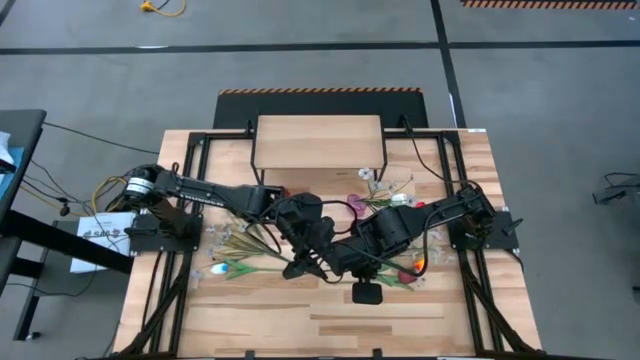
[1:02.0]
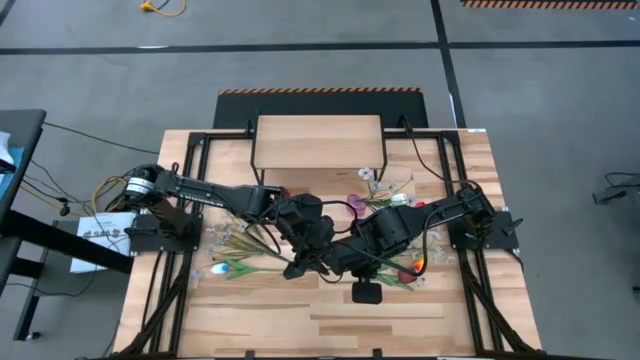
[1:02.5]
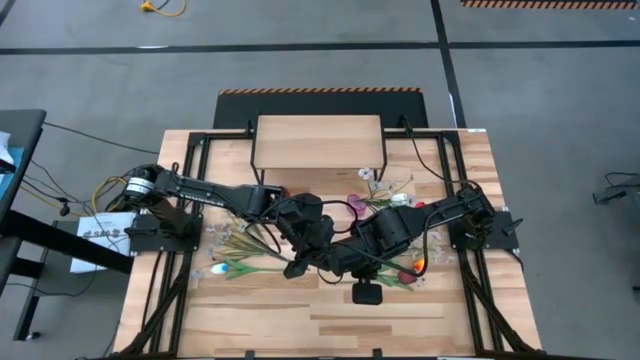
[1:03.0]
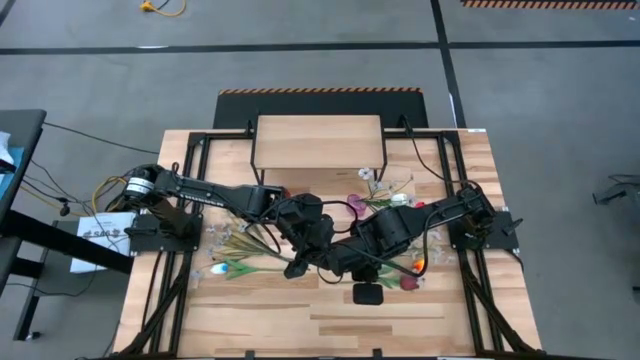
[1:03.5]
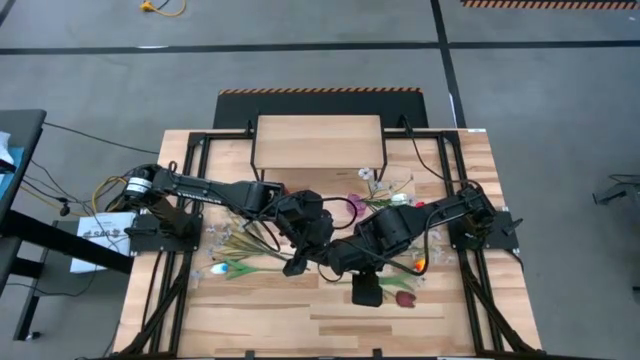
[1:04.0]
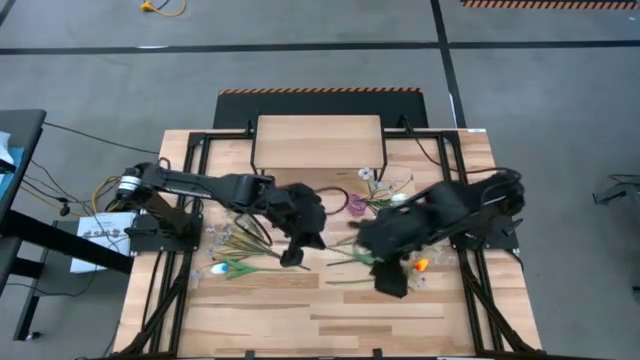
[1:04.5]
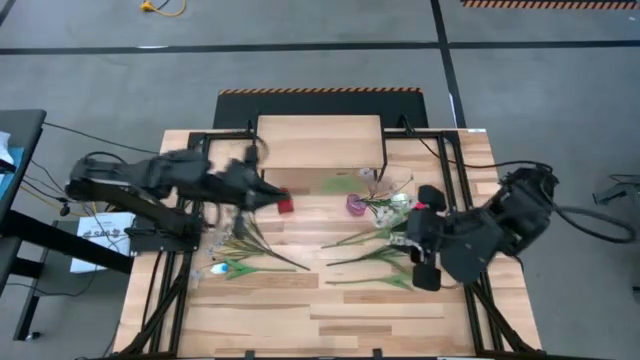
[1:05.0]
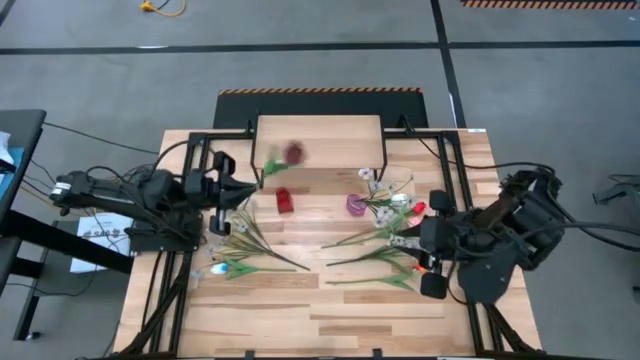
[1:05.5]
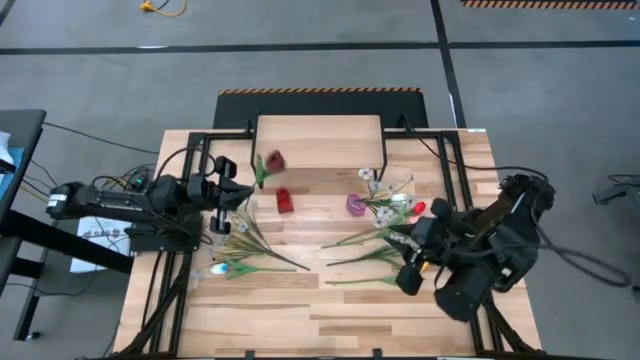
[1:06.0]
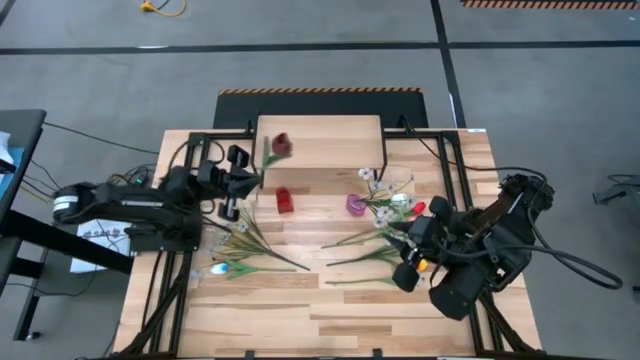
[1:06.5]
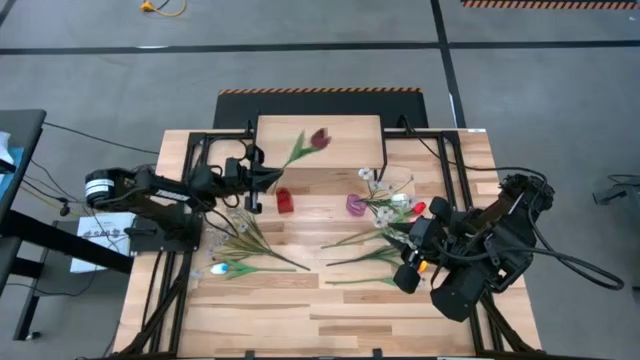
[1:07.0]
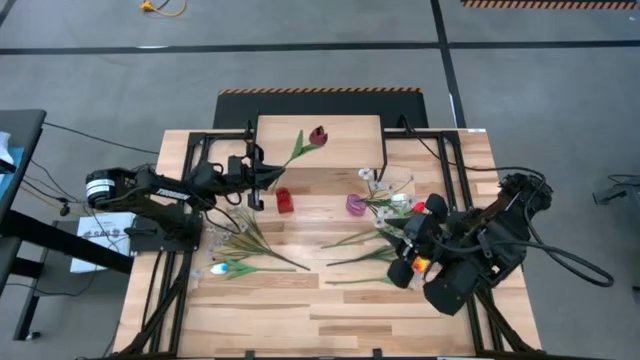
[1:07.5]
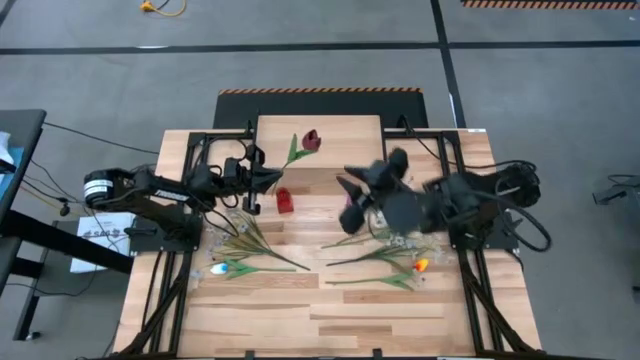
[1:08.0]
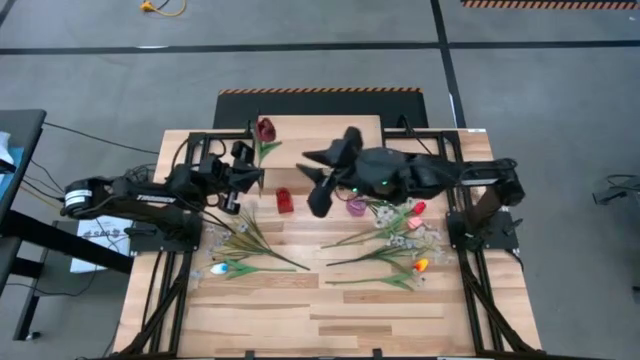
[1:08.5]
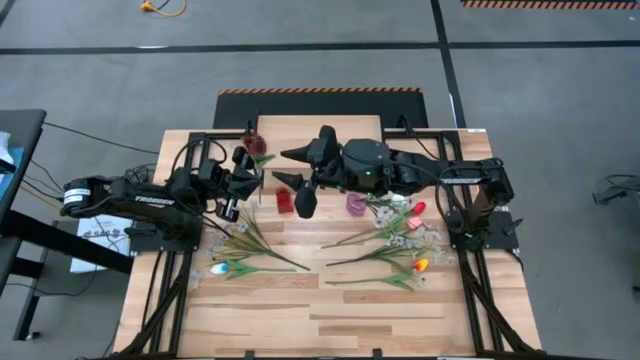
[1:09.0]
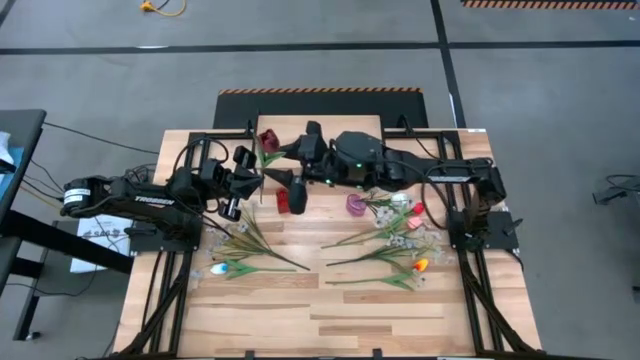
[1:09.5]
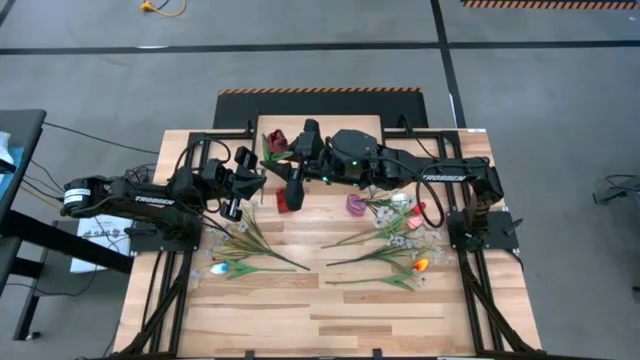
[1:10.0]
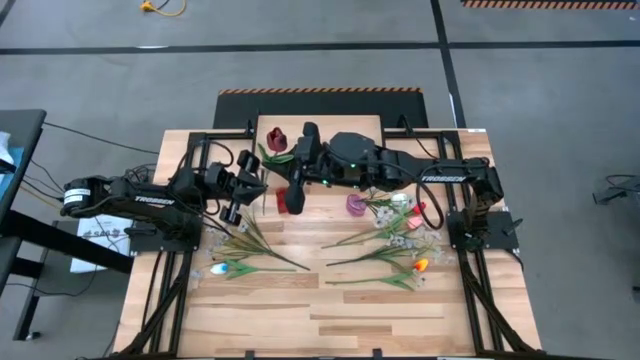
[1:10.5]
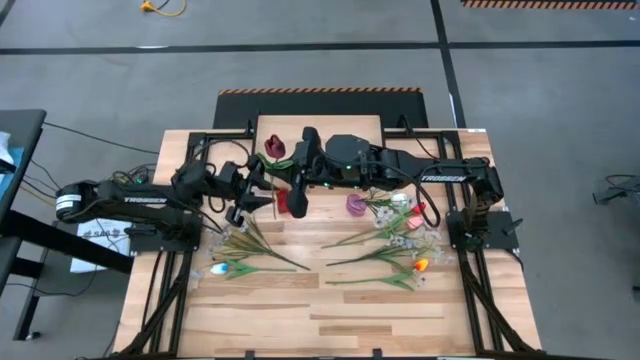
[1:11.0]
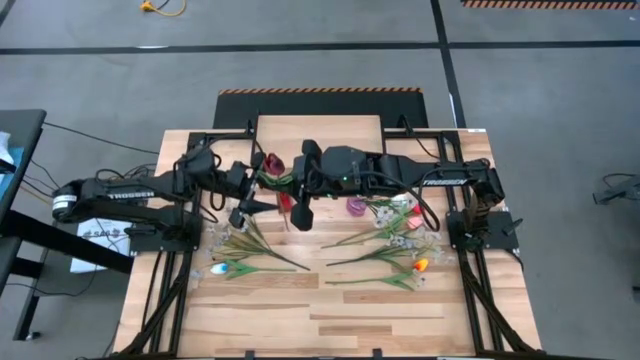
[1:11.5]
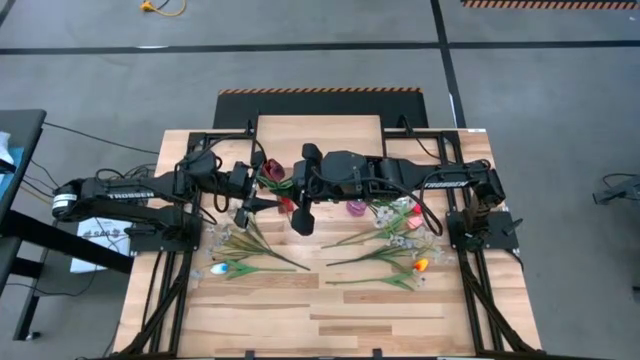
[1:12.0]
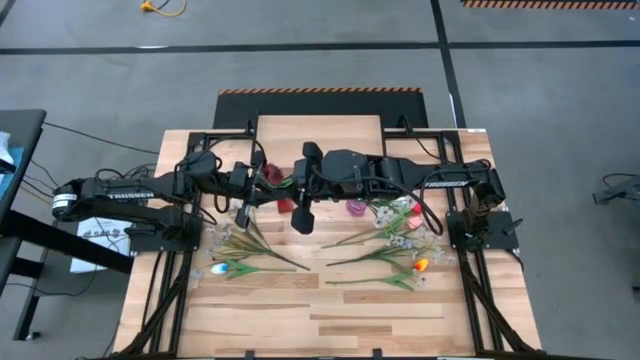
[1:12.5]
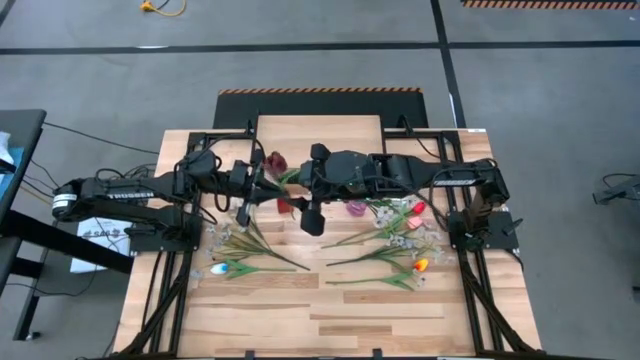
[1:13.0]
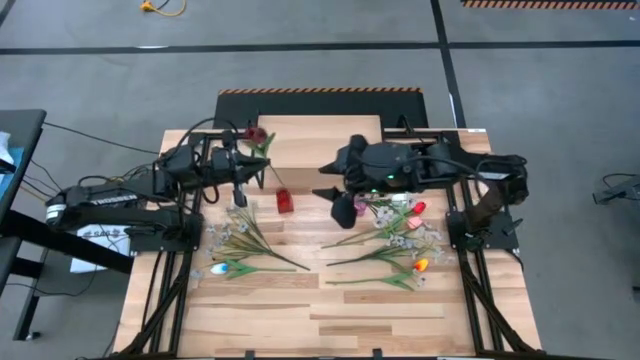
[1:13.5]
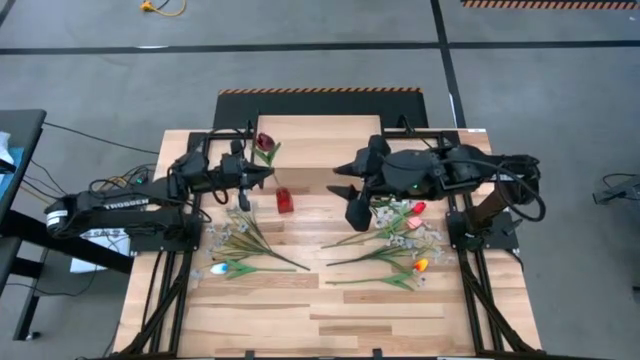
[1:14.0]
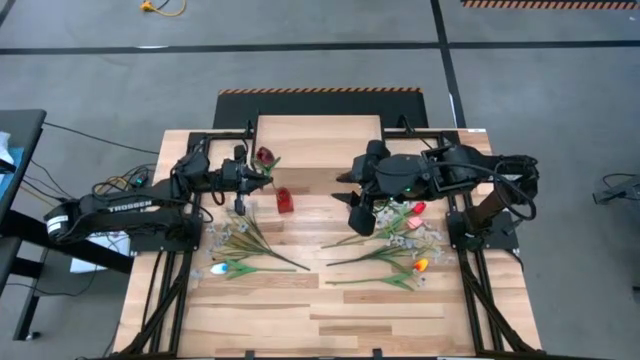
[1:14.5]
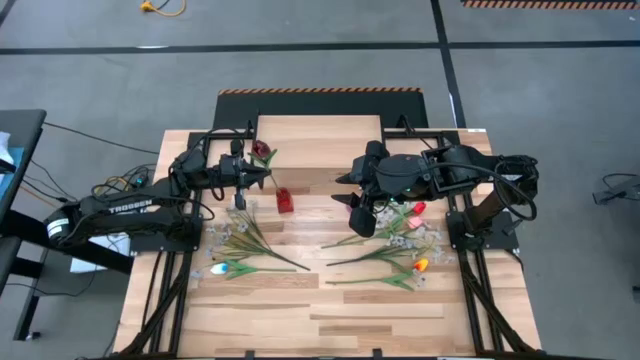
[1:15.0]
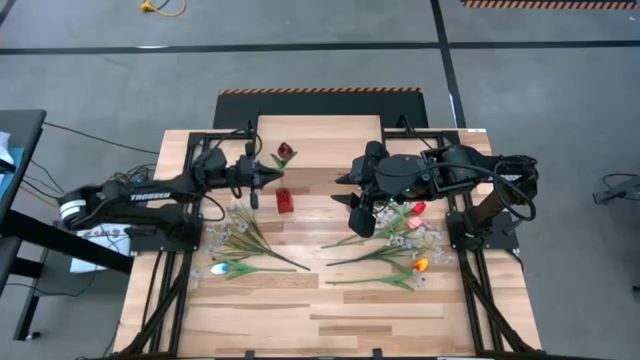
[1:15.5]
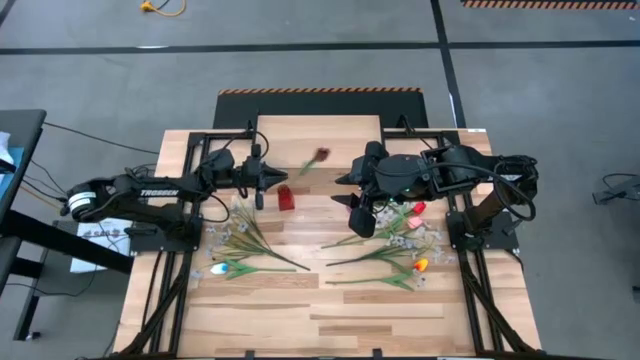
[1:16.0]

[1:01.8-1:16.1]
Task: Pick and place flowers into a vace then onto a shelf
Put the dark red tulip into the red vase

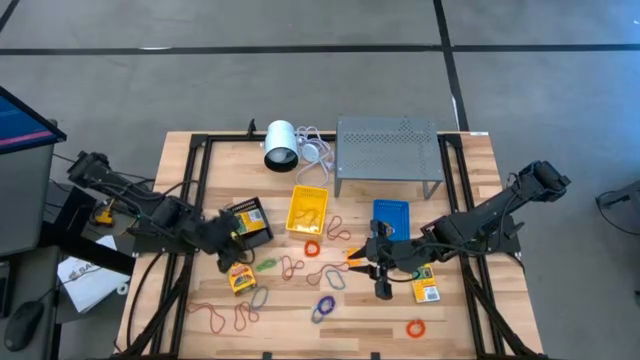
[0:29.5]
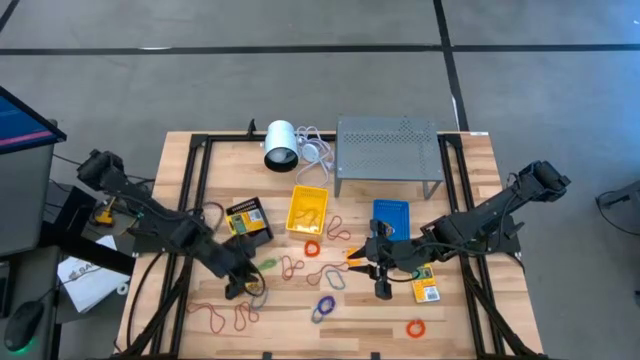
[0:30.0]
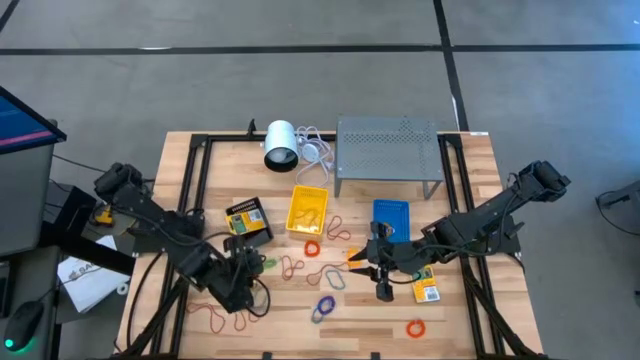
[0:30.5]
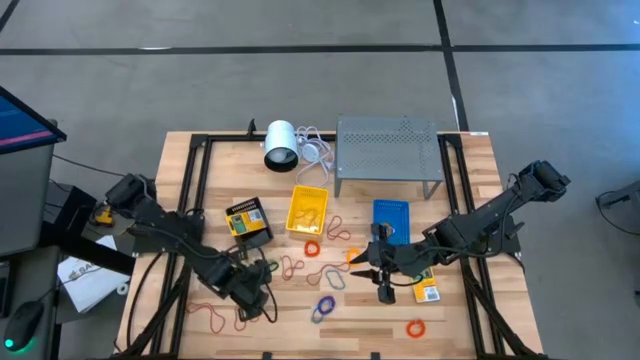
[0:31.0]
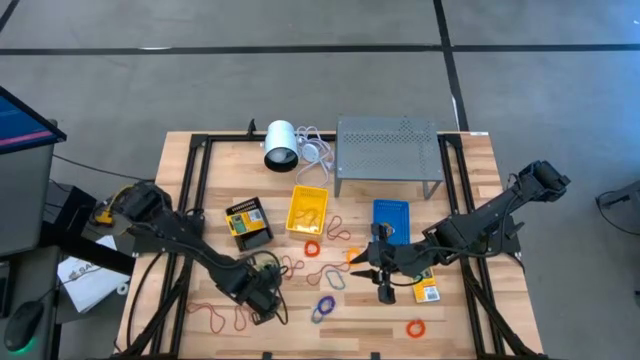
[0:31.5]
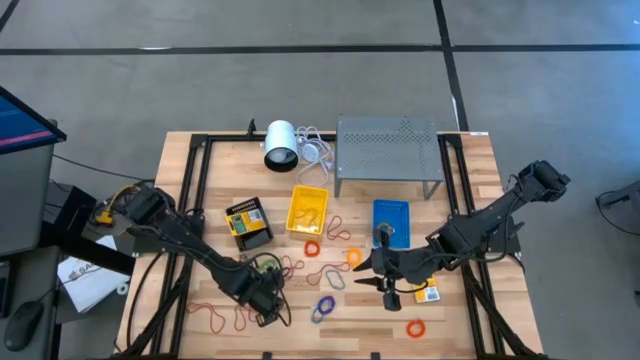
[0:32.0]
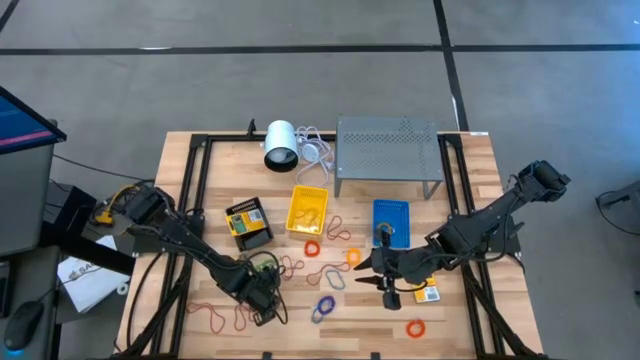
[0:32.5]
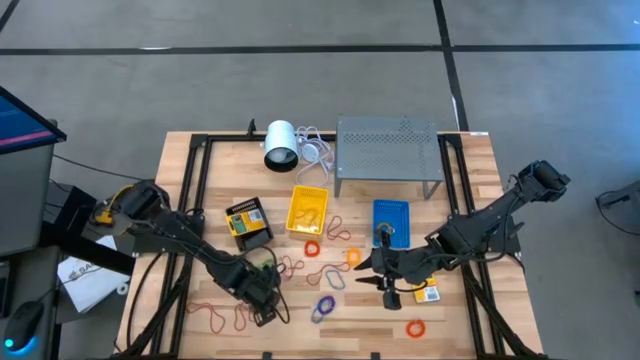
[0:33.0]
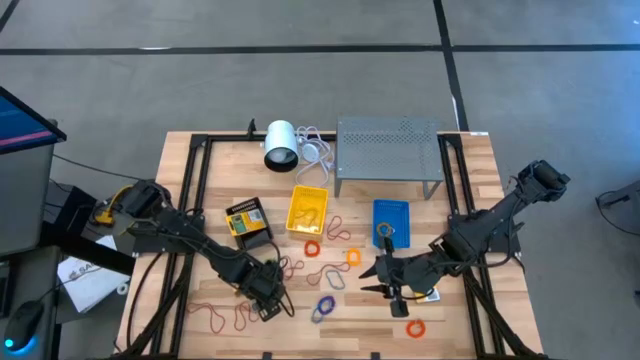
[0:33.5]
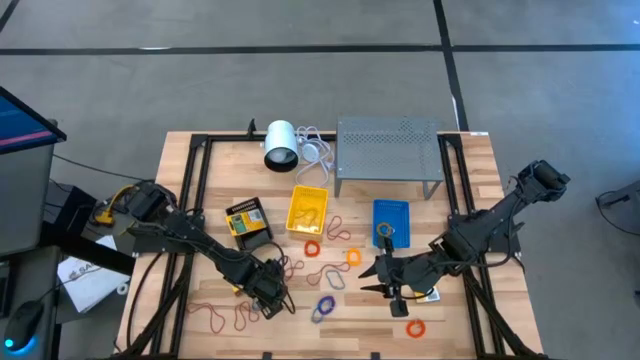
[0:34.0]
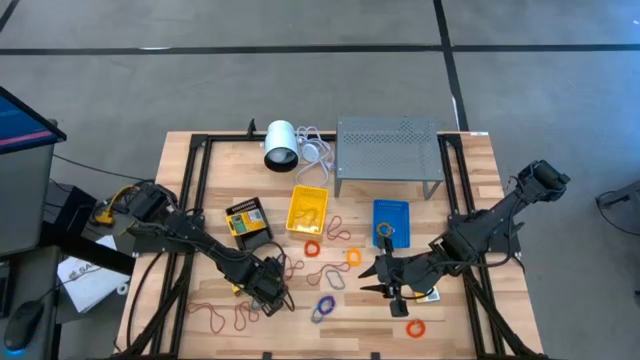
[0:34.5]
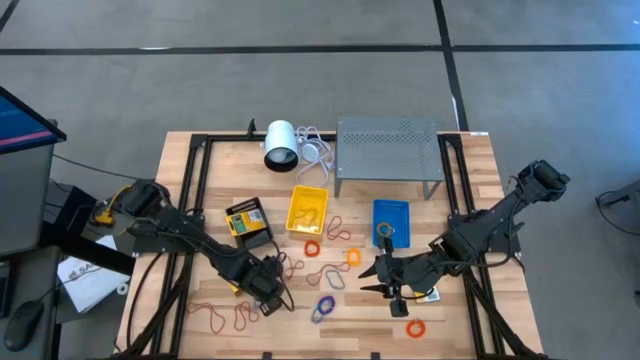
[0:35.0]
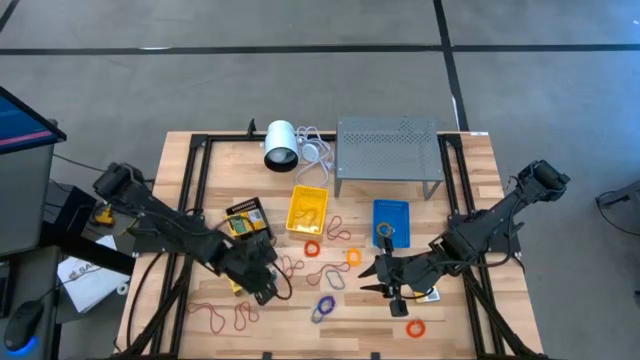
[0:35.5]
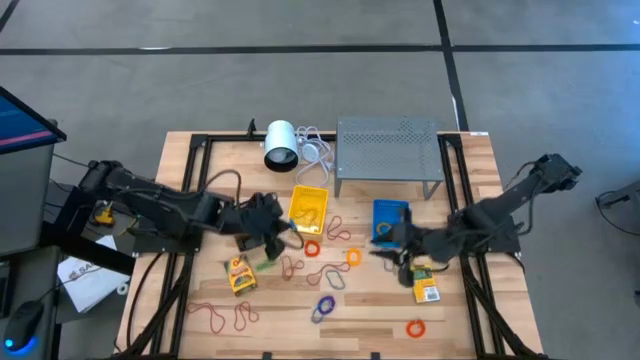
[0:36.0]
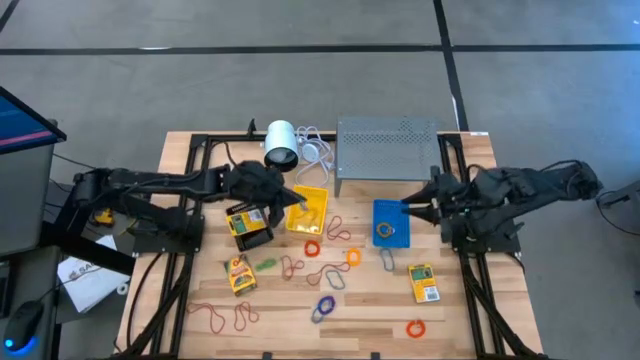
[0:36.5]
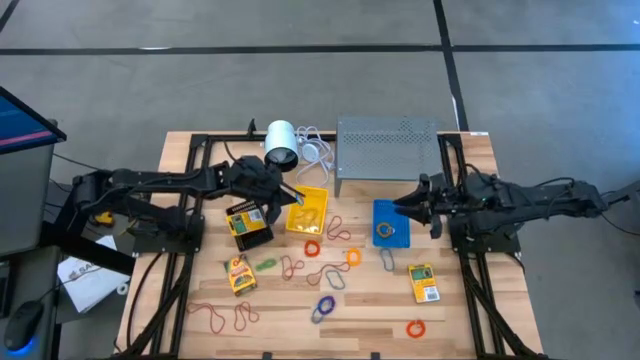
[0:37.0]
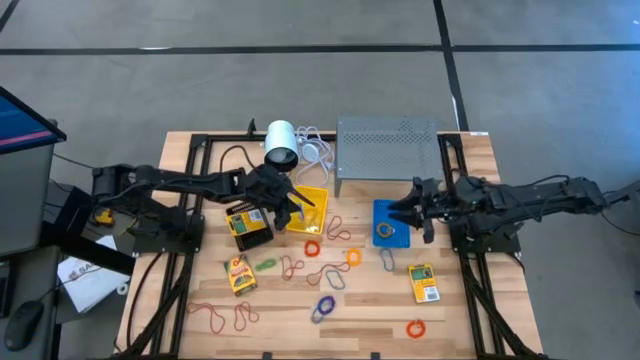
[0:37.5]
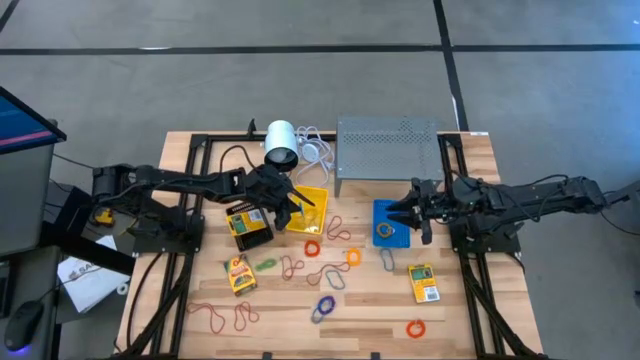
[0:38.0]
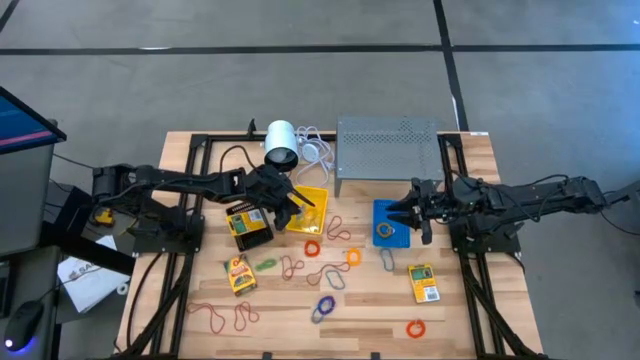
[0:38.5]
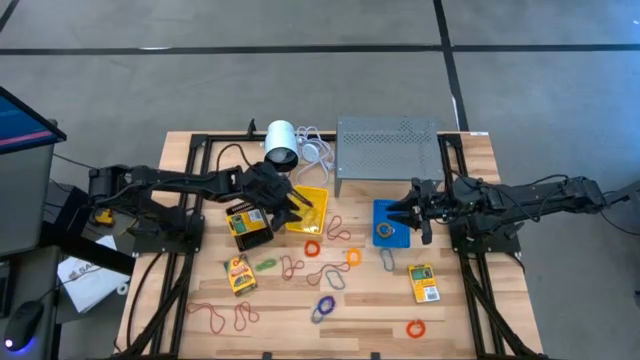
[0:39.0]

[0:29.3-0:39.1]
Task: Pick & Place Office Desk Supplies
Put the left blue rubber band into the yellow basket
